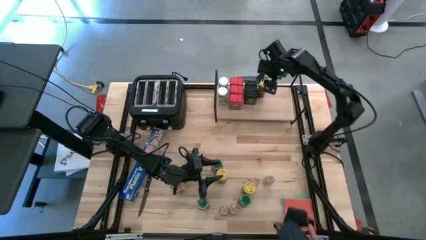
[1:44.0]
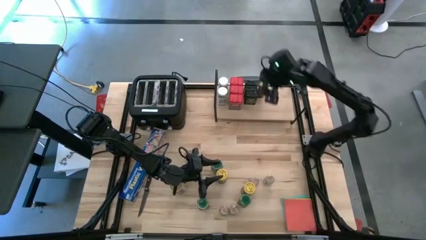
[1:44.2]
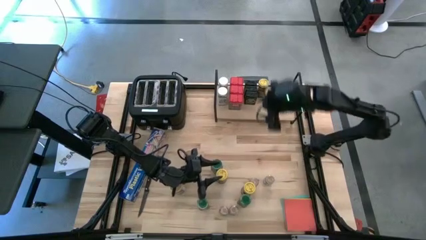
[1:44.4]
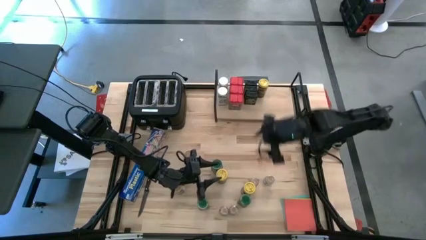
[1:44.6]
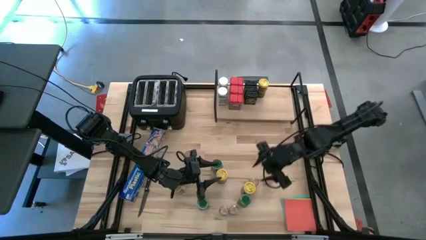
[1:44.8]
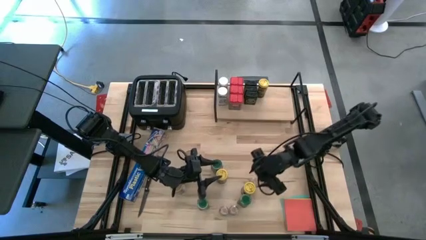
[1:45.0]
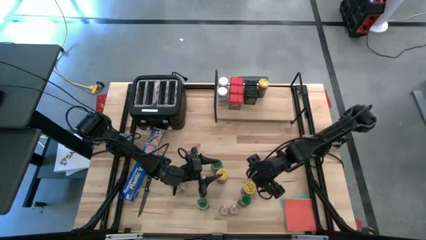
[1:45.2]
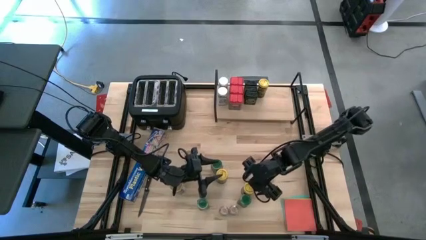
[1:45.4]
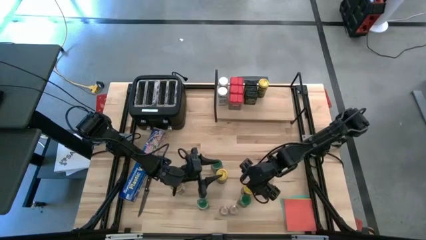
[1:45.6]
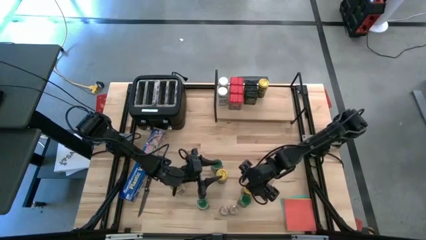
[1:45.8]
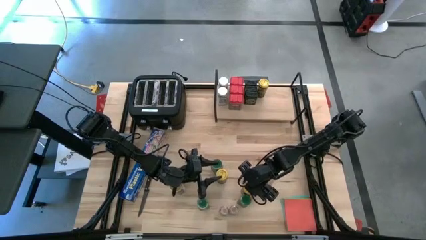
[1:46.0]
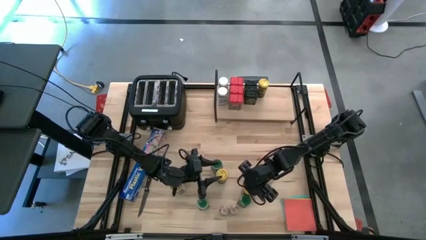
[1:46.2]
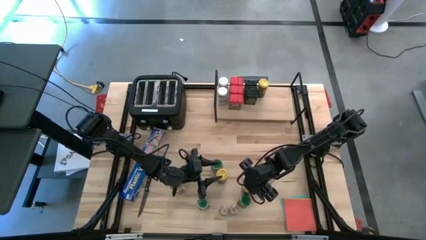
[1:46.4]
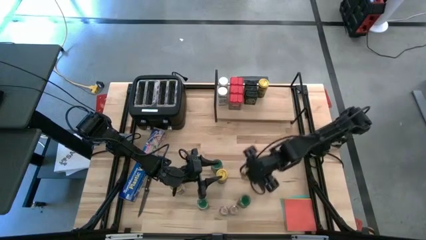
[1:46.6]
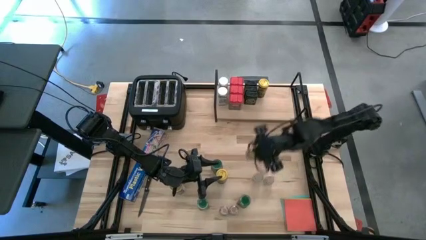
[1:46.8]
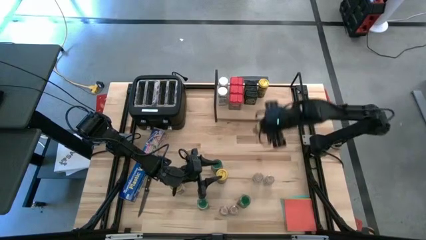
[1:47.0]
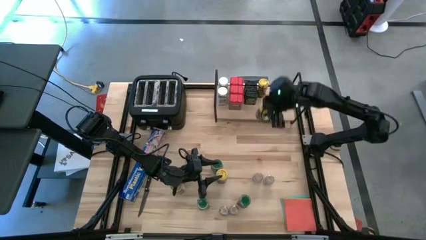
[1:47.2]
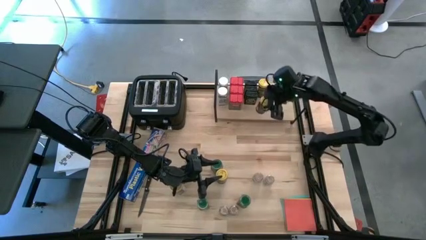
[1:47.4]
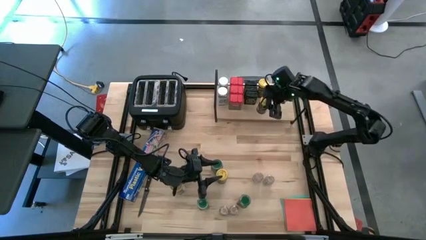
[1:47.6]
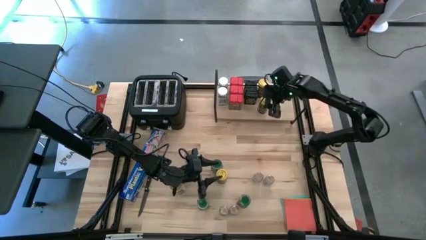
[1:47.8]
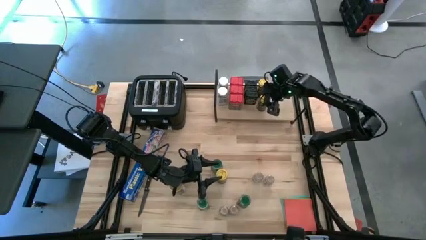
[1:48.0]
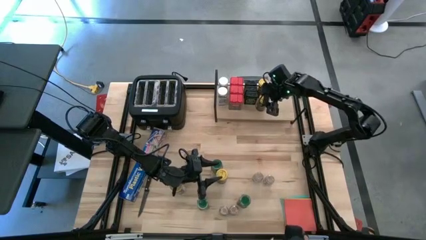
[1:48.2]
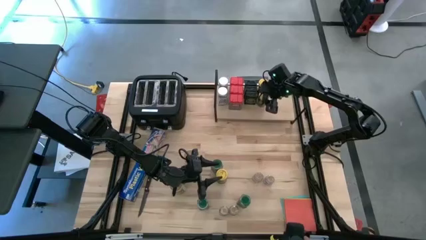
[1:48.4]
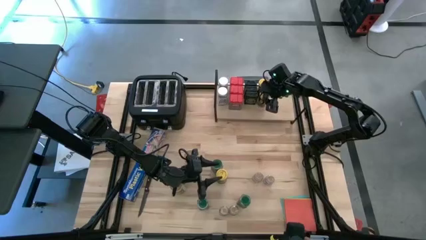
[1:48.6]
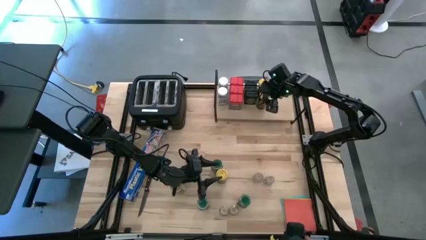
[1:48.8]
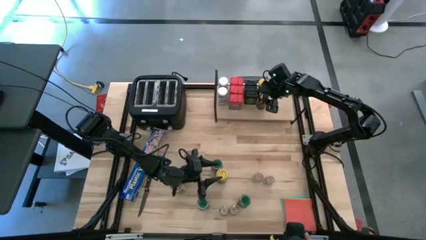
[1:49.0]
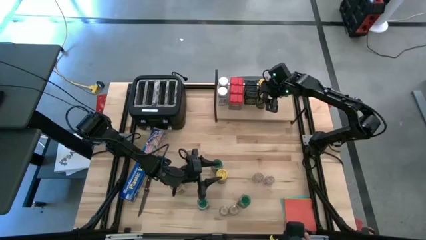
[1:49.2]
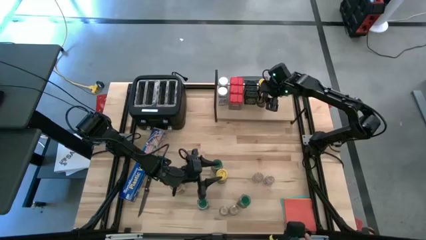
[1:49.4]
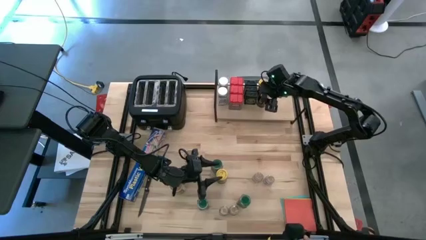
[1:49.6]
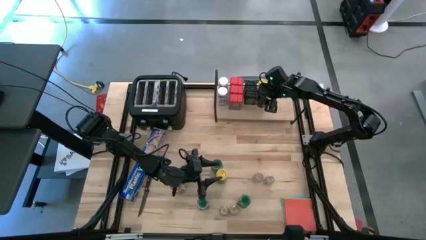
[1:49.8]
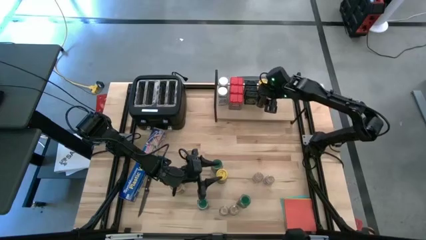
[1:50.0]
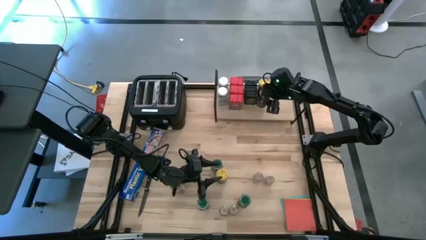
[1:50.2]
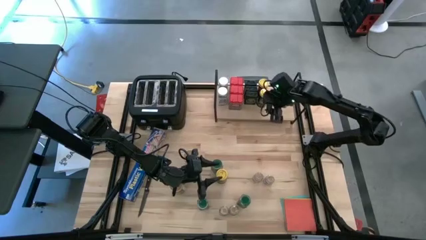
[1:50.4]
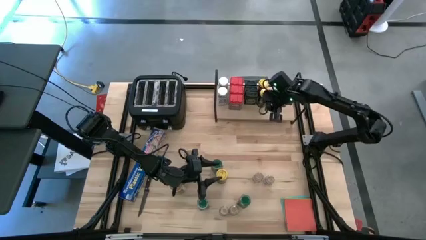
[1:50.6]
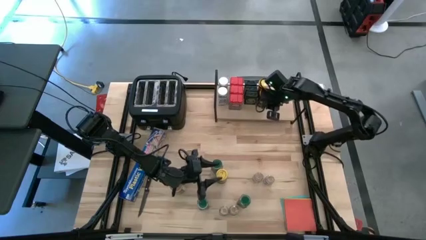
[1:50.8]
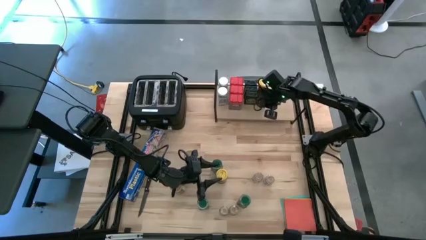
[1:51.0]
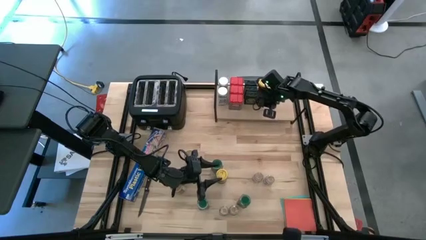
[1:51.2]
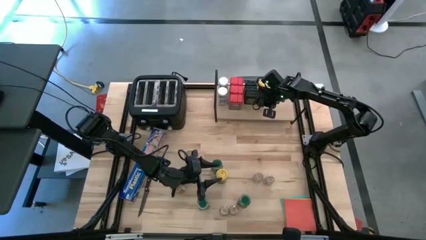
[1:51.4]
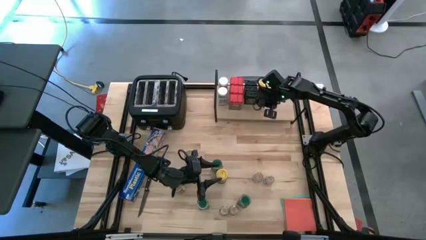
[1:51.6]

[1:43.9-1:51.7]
Task: Shelf spices
Put the right yellow seasoning bottle on the shelf aligned with the other yellow seasoning bottle

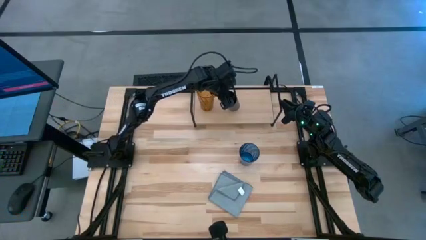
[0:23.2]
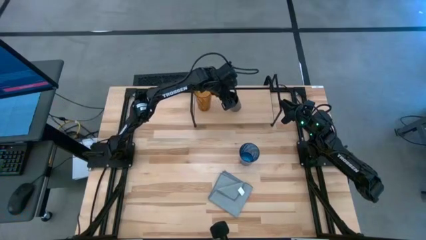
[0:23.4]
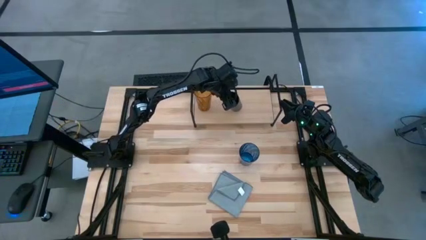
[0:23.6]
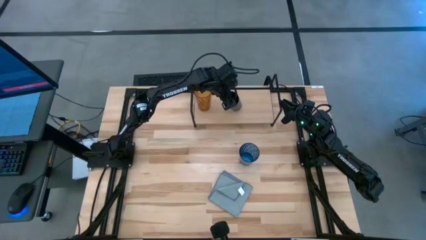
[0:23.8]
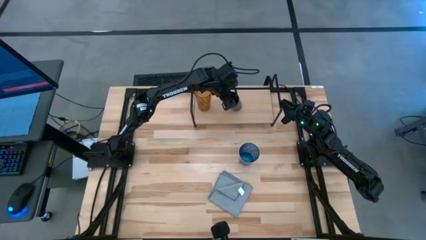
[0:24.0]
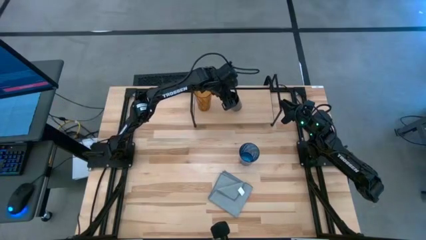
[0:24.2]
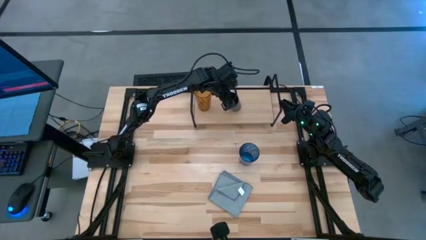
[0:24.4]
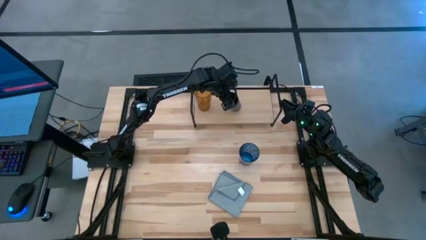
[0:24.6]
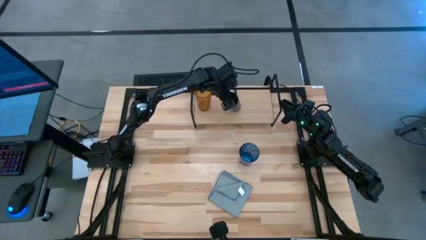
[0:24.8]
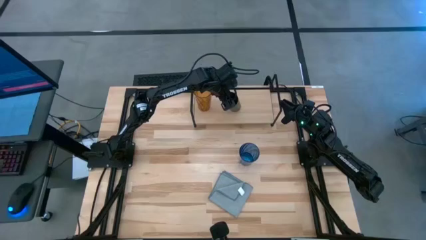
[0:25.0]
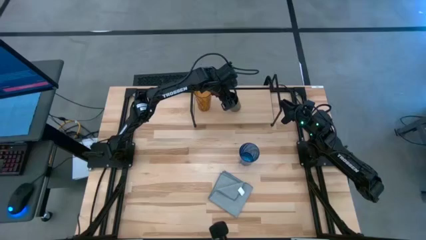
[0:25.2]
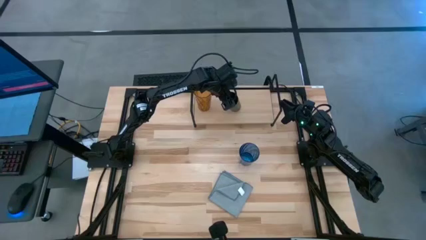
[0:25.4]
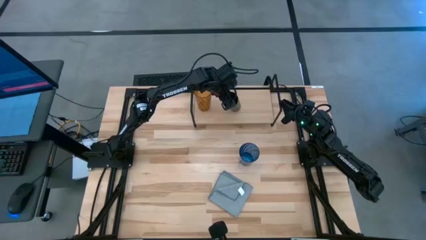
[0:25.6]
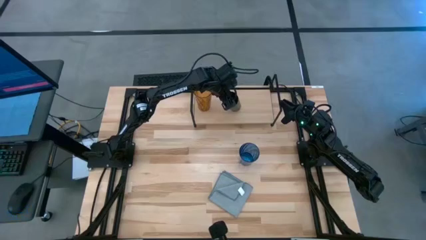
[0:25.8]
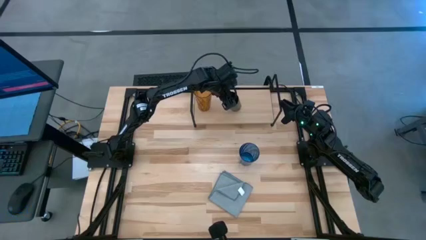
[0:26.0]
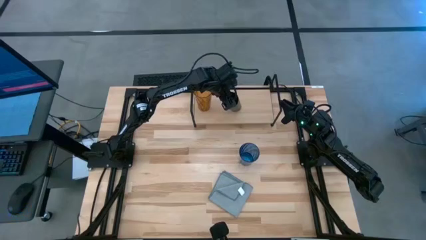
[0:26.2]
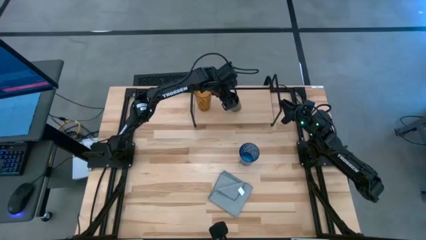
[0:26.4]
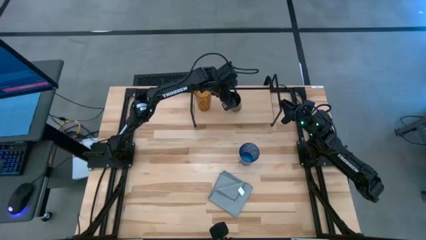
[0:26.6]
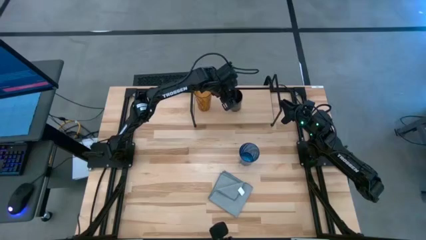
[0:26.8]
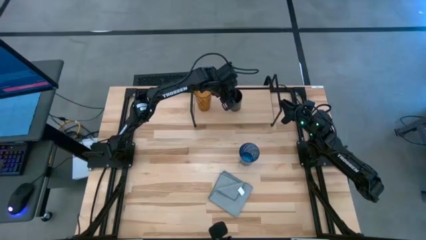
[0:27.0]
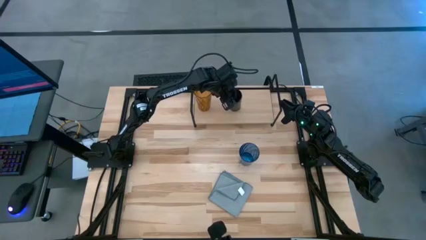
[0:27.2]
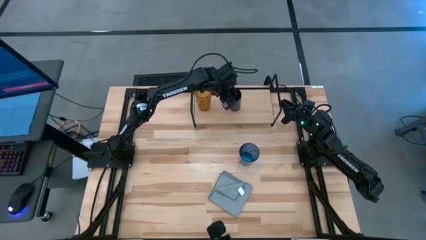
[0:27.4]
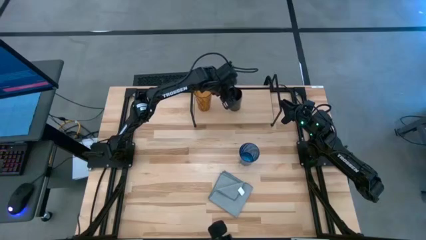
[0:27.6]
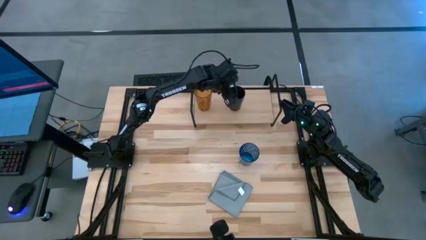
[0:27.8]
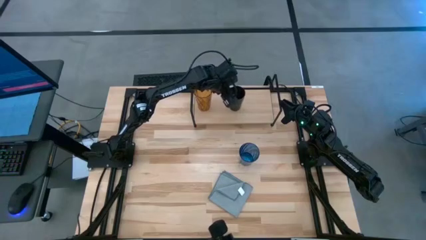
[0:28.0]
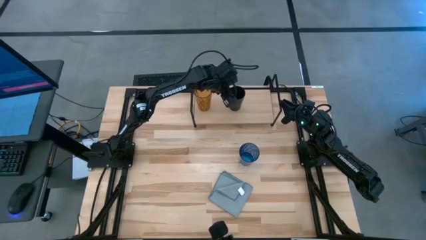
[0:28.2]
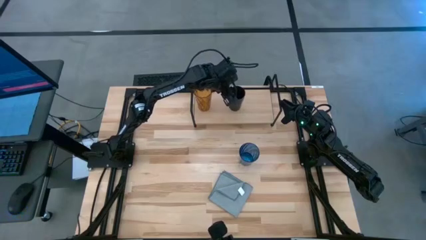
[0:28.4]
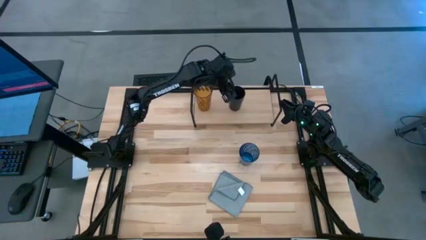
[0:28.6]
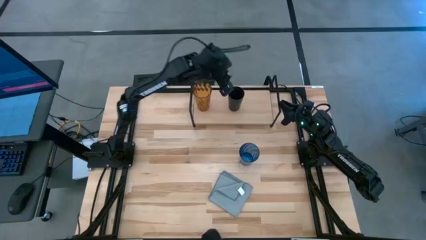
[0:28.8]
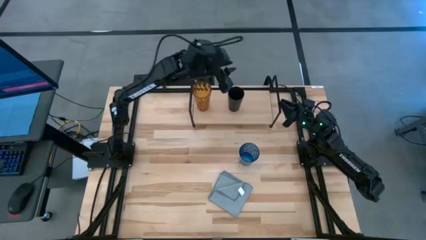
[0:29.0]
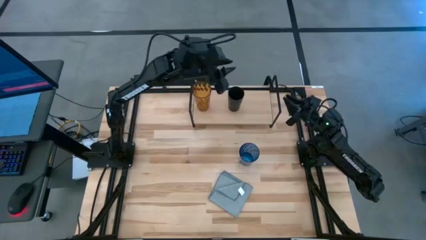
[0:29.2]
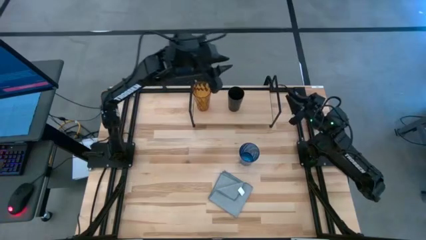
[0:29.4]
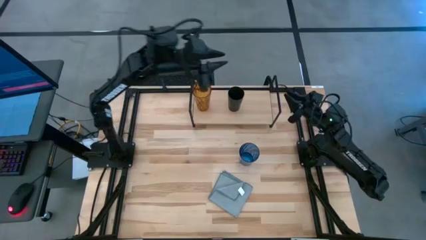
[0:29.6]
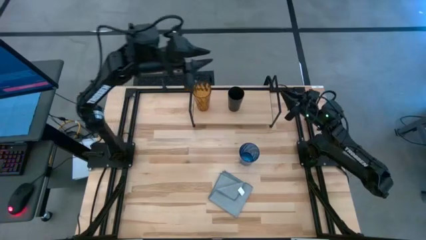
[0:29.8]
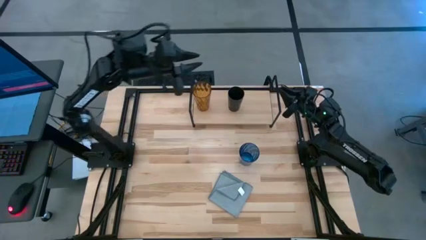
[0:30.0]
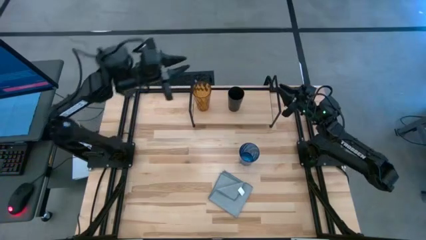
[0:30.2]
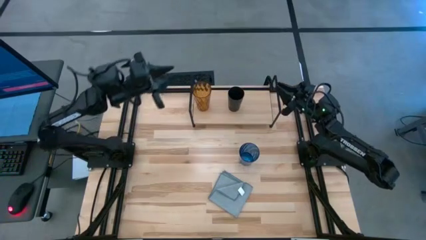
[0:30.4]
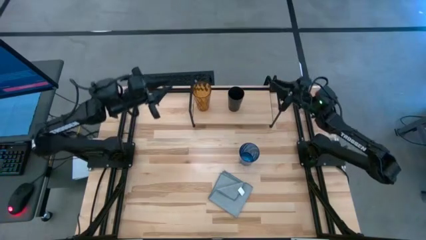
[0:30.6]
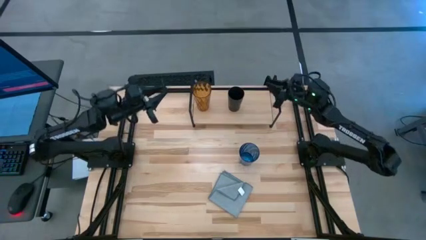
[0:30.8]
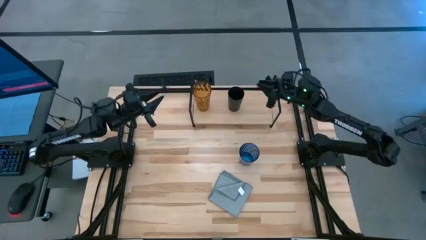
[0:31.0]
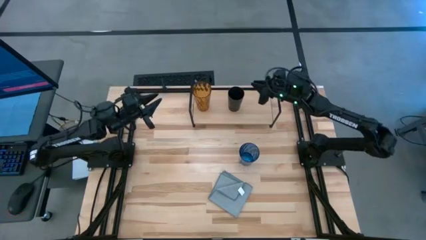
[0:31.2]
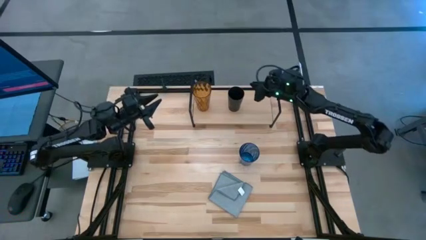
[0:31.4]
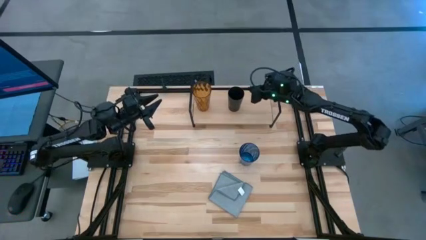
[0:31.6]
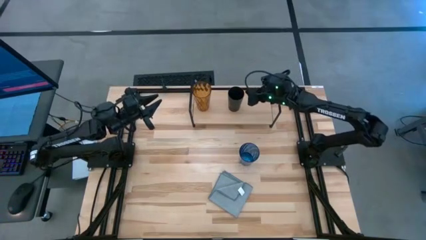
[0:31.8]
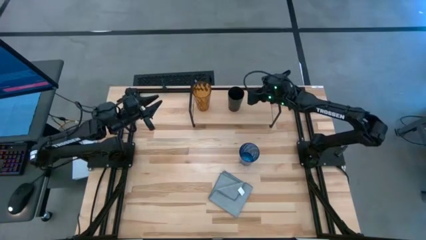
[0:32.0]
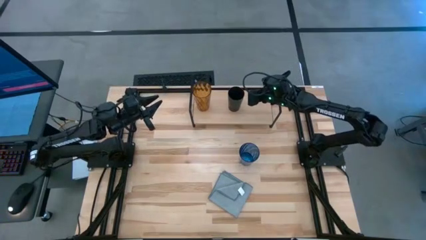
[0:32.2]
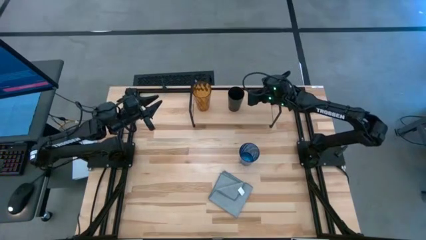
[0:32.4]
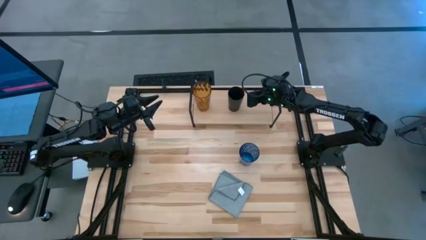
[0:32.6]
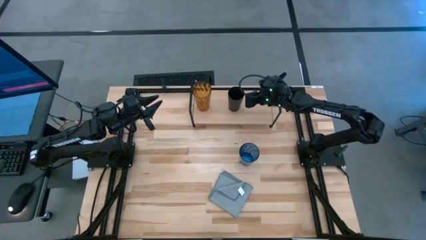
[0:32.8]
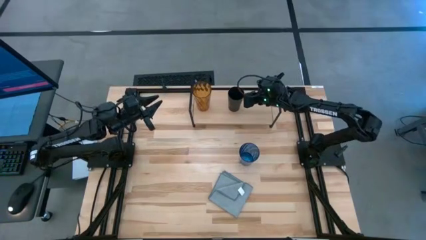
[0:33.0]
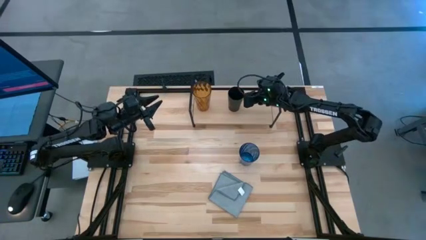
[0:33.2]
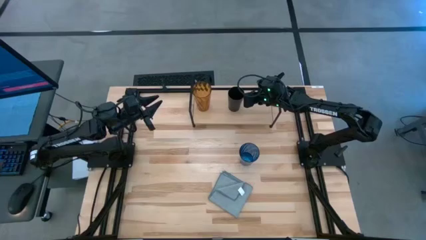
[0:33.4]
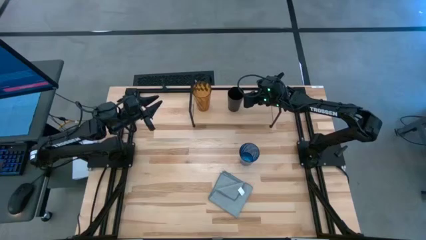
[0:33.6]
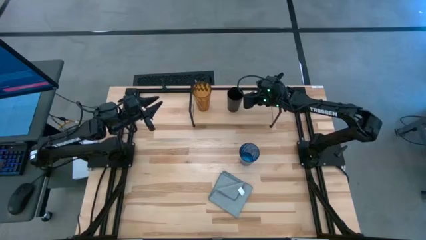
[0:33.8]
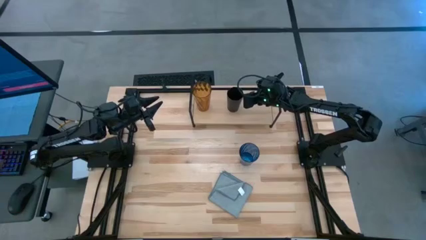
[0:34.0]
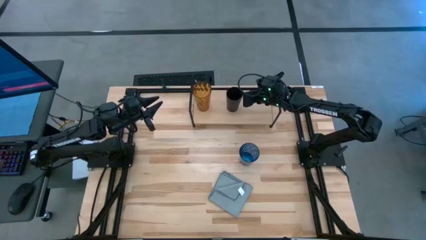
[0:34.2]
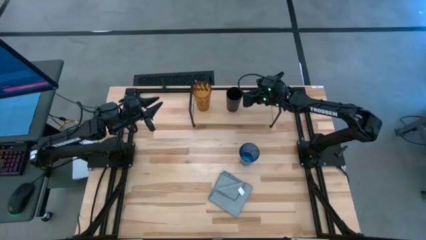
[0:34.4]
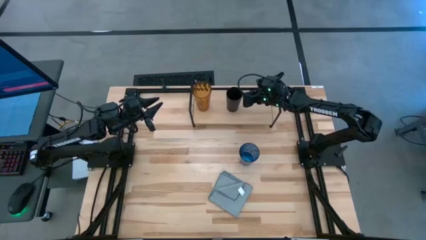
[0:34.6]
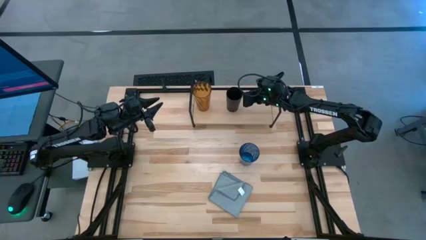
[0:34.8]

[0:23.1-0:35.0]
Task: Stack small to large cups/mugs on shelf
Put the black cup on the shelf
